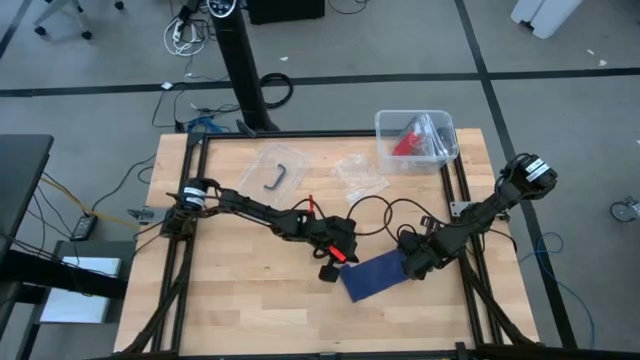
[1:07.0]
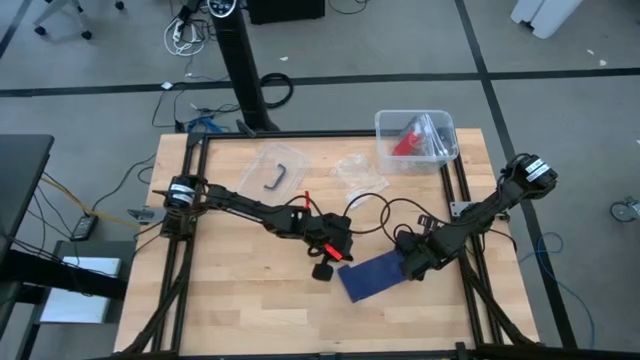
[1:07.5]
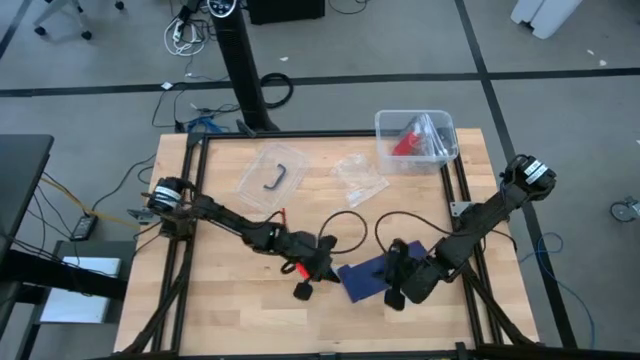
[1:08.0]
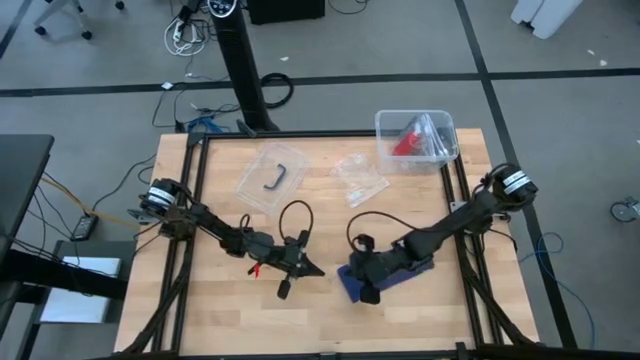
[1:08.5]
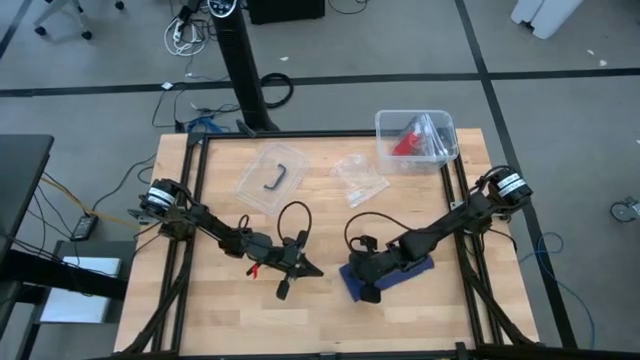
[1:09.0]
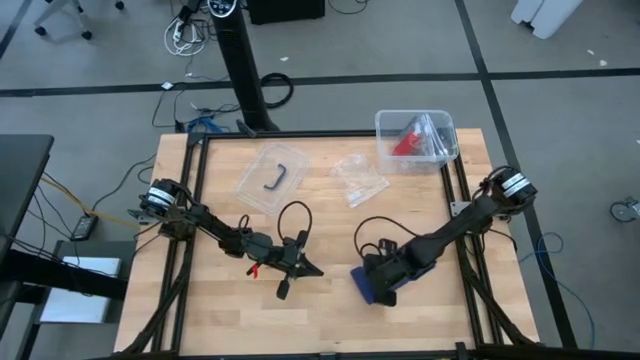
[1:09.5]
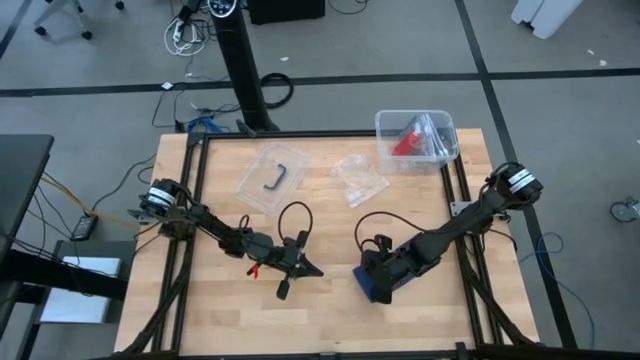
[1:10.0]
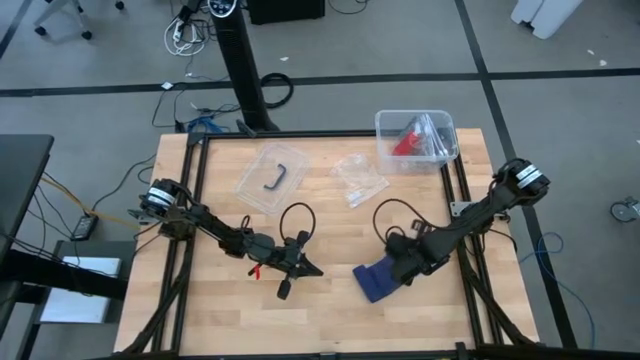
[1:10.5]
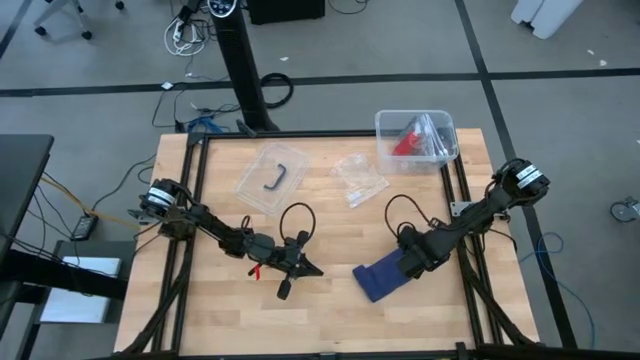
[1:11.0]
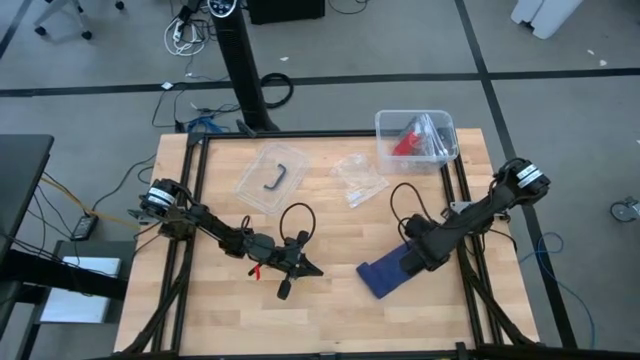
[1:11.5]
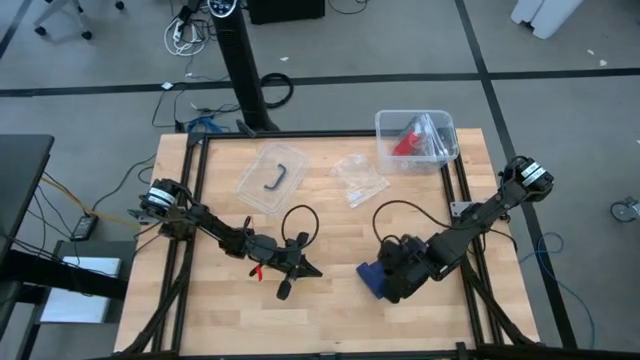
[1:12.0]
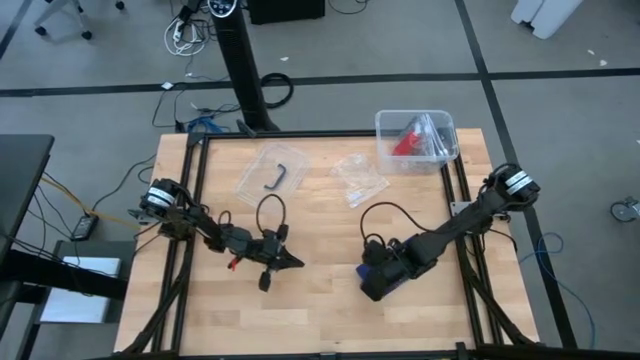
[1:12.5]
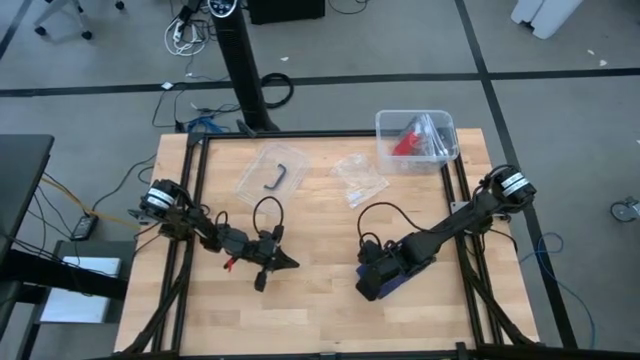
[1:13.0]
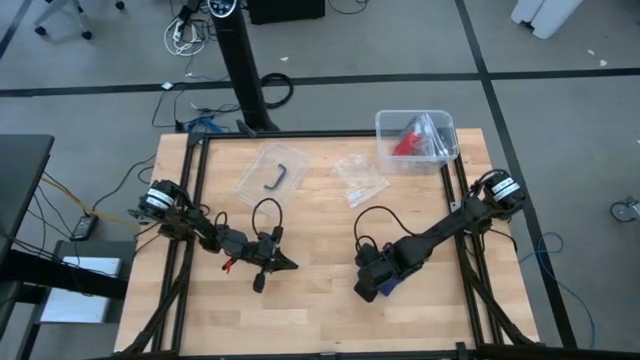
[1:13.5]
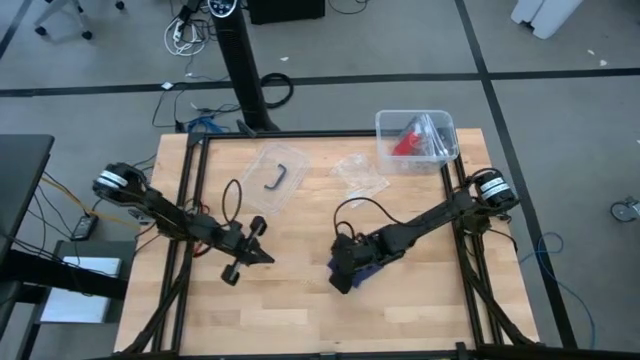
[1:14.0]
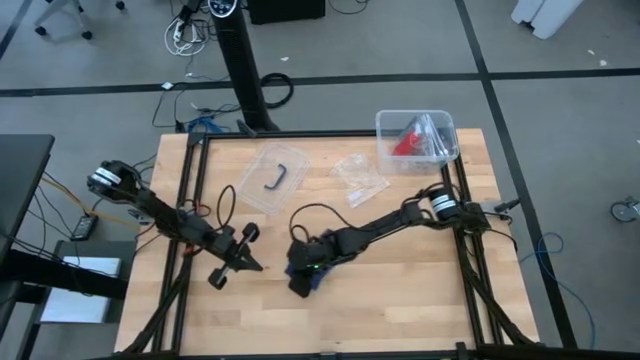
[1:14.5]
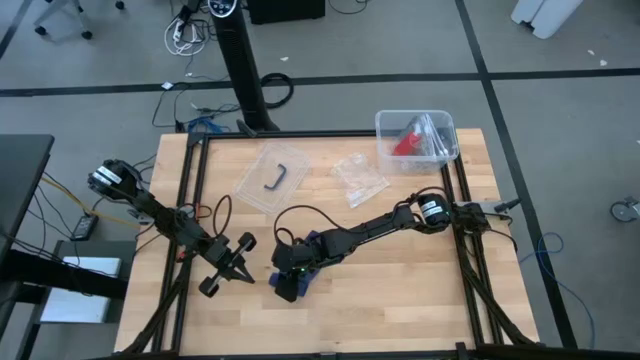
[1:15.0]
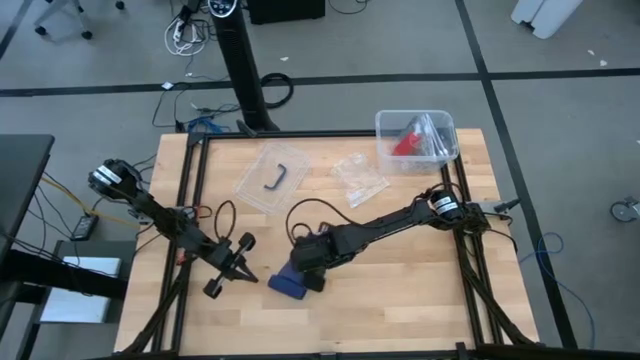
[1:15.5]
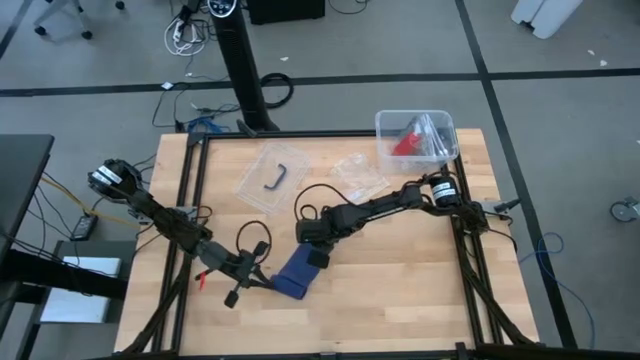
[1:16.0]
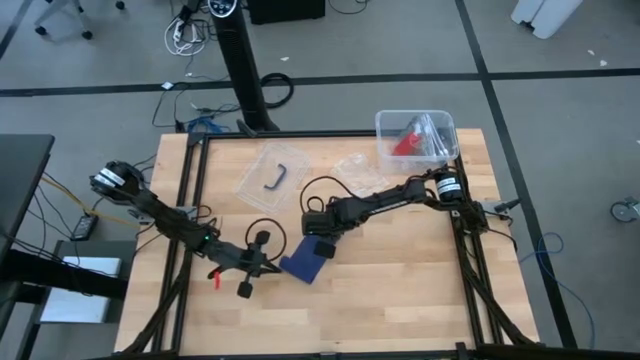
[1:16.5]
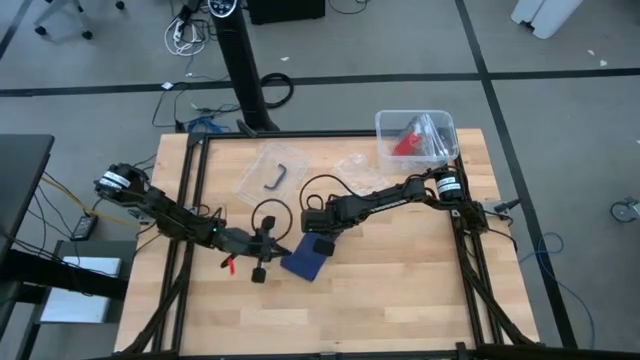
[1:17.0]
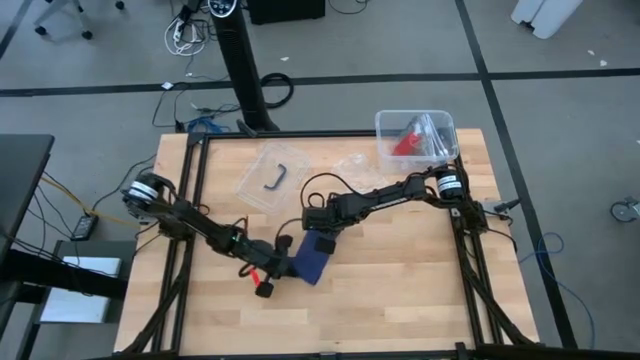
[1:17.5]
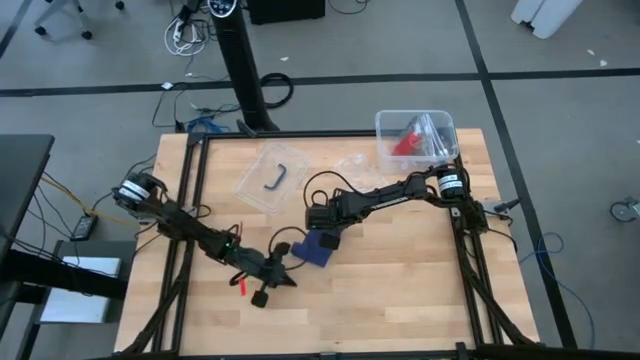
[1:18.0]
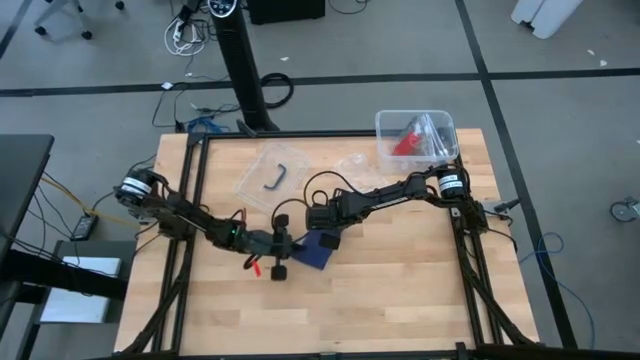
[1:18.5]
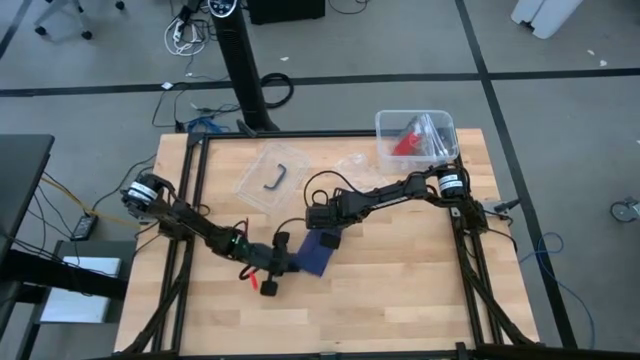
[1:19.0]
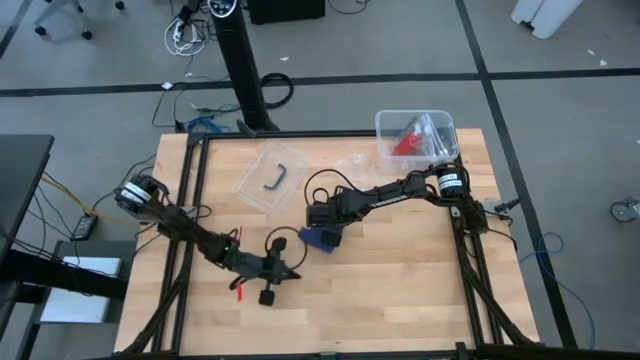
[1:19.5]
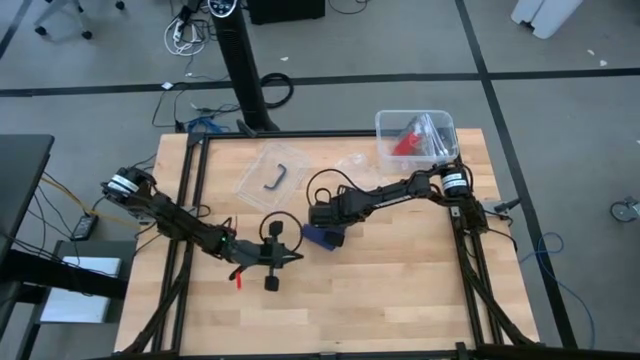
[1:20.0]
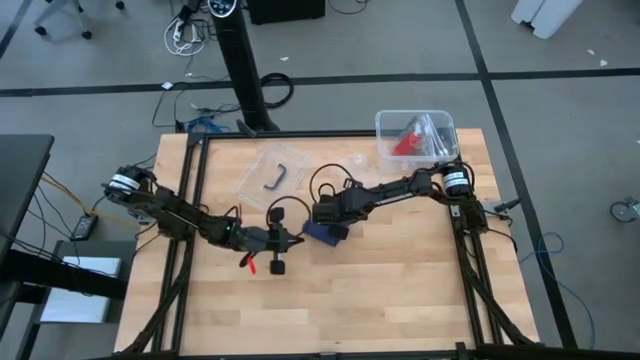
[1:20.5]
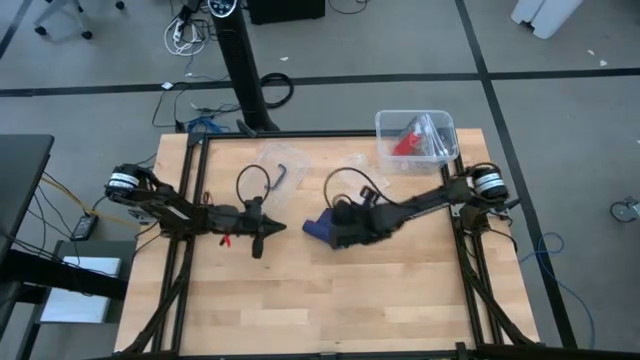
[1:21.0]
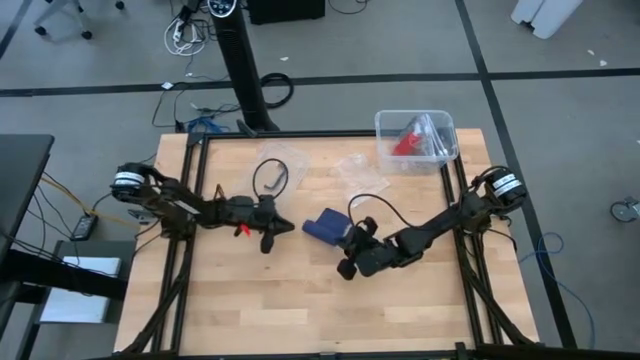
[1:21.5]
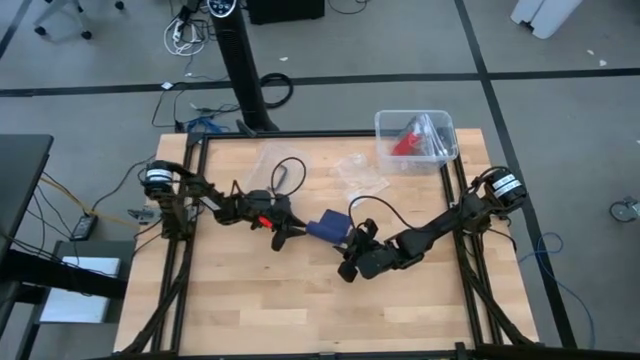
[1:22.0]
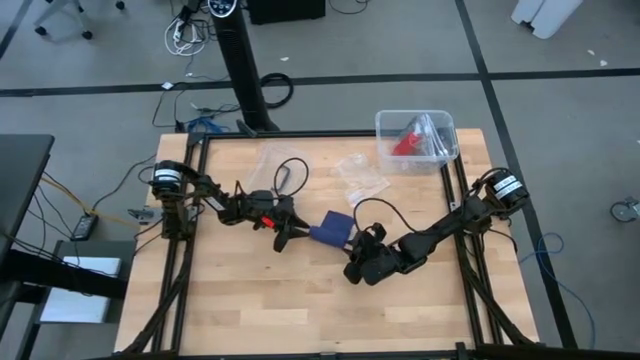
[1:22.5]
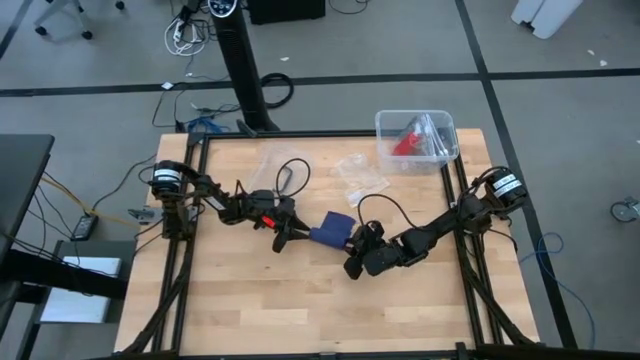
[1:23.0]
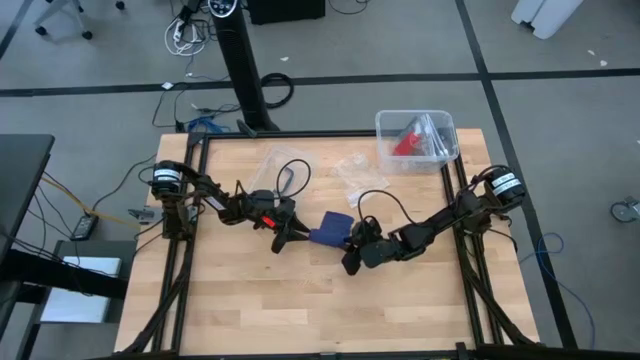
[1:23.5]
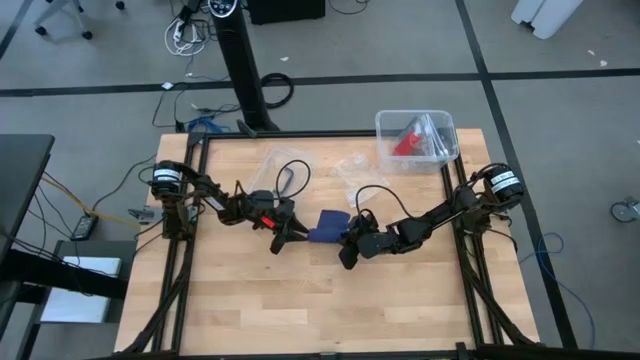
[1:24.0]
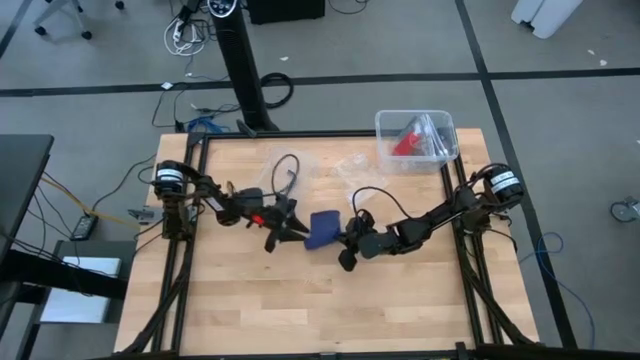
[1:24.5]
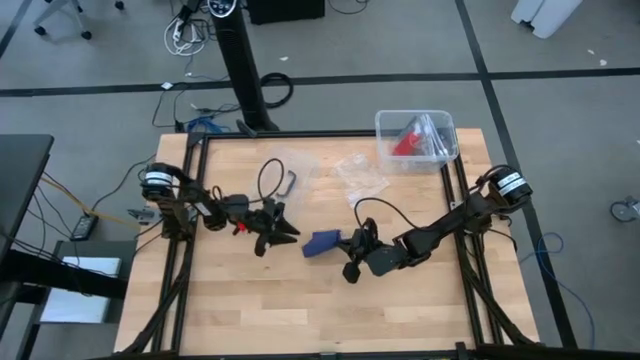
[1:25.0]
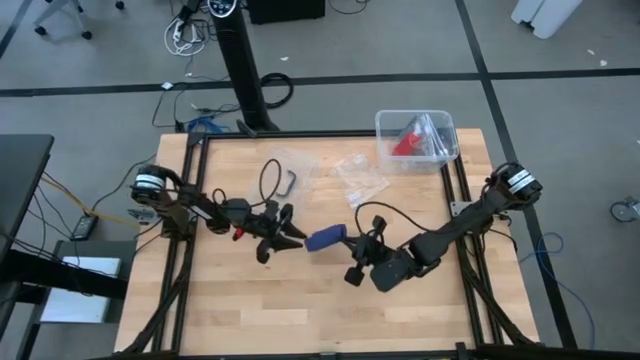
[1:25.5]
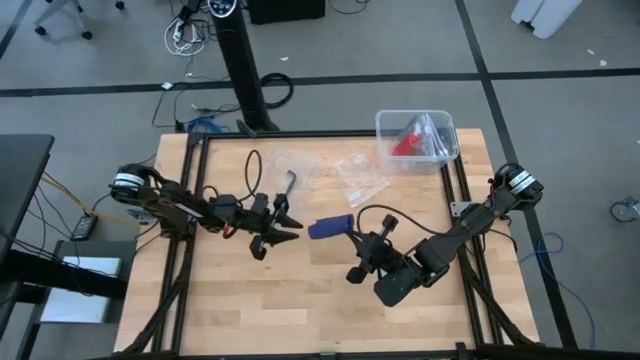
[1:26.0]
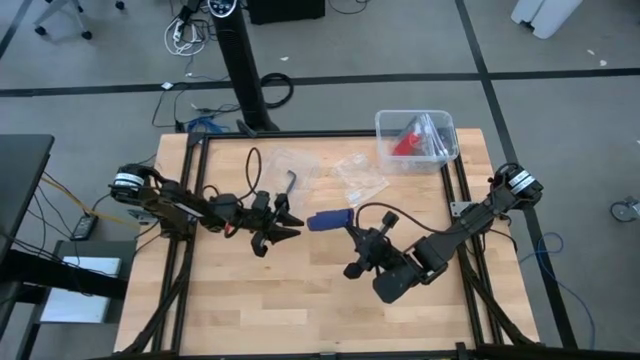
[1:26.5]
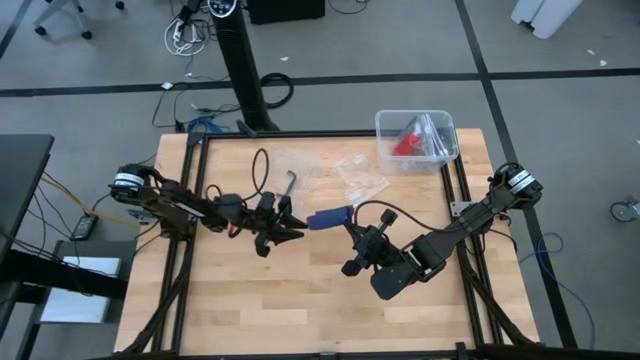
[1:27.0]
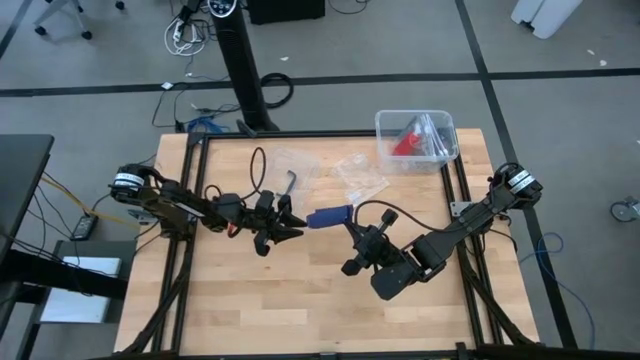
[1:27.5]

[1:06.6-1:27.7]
Task: Roll bandage
Roll the blue bandage
